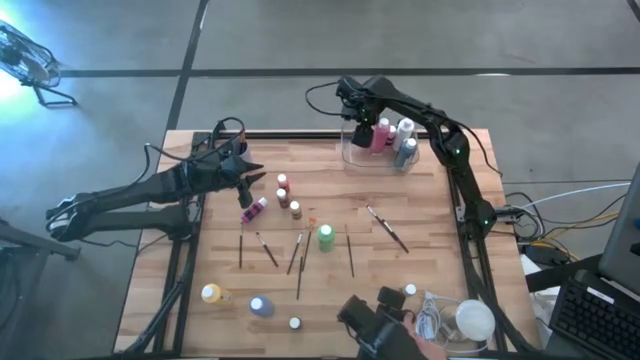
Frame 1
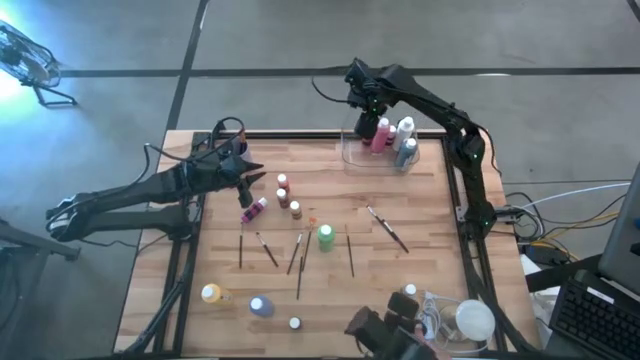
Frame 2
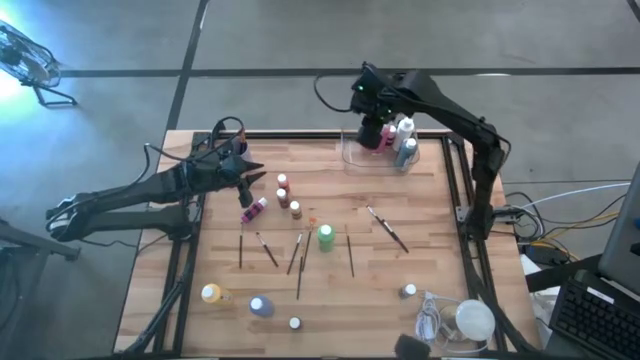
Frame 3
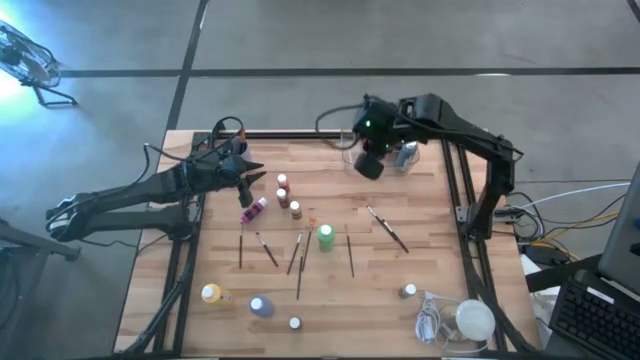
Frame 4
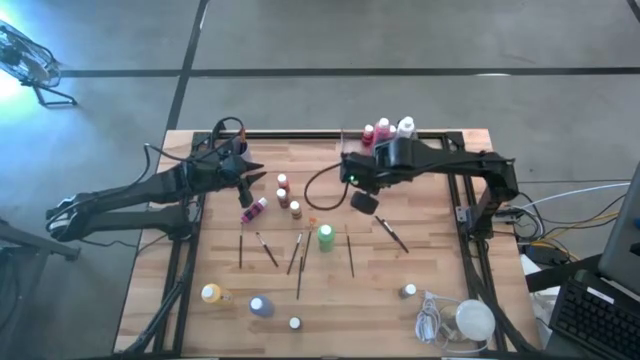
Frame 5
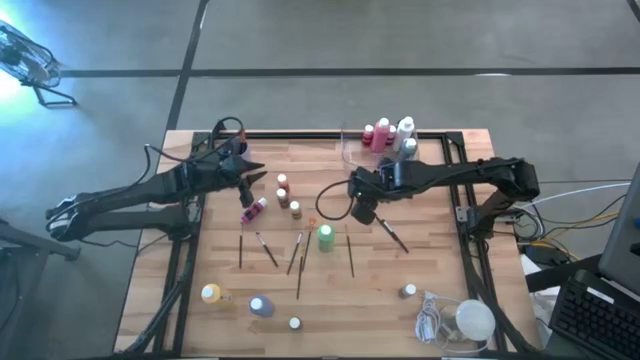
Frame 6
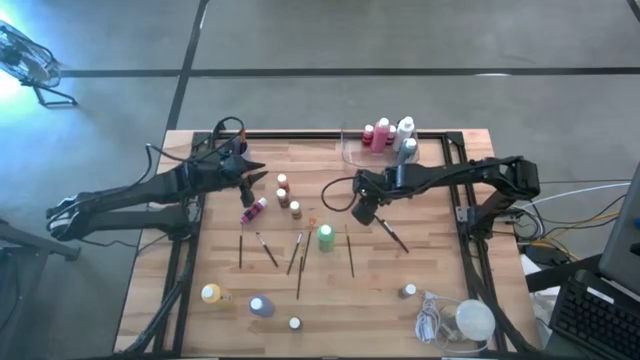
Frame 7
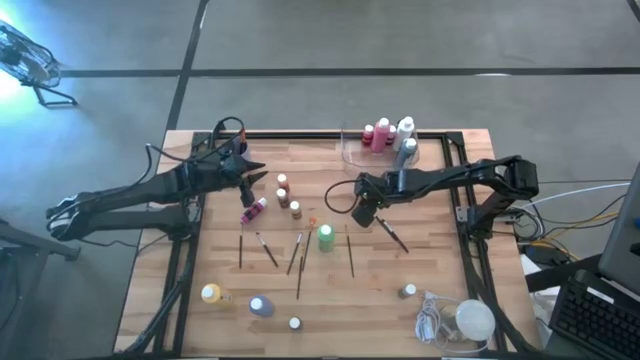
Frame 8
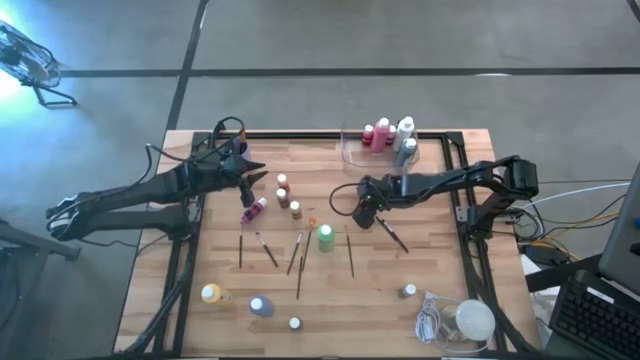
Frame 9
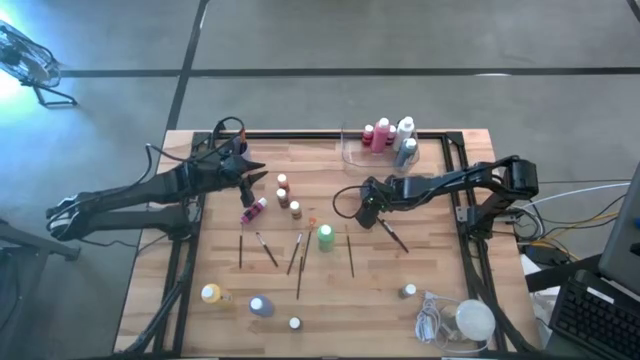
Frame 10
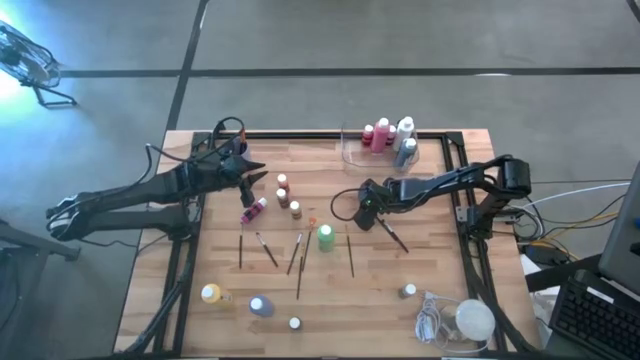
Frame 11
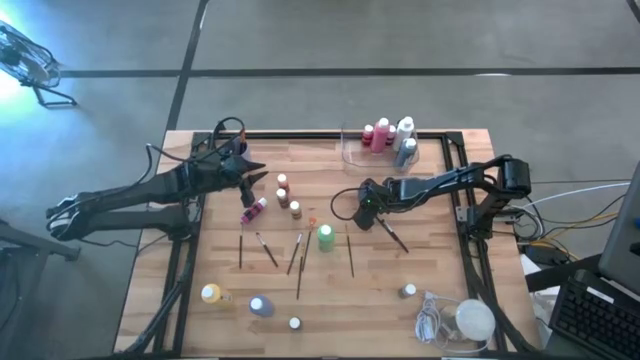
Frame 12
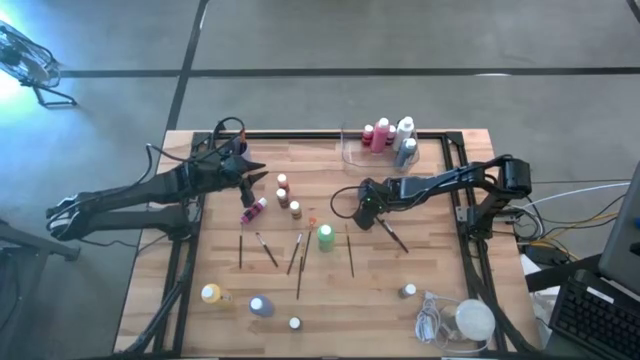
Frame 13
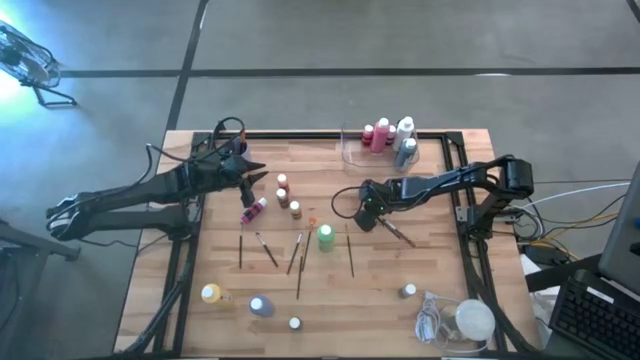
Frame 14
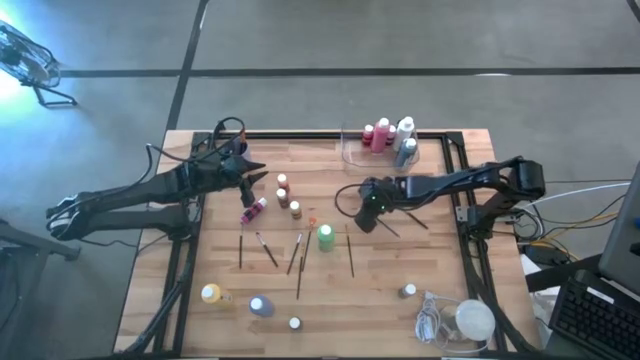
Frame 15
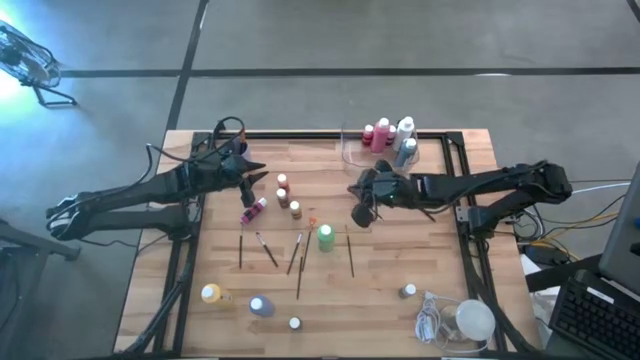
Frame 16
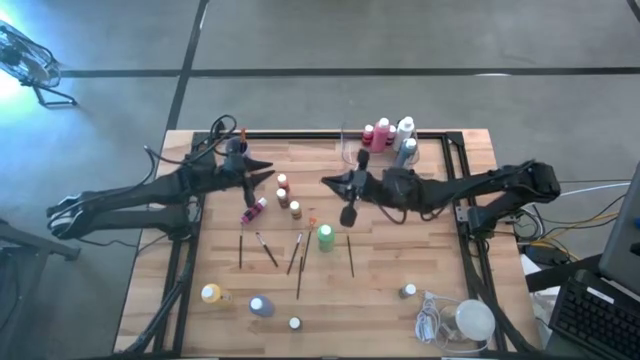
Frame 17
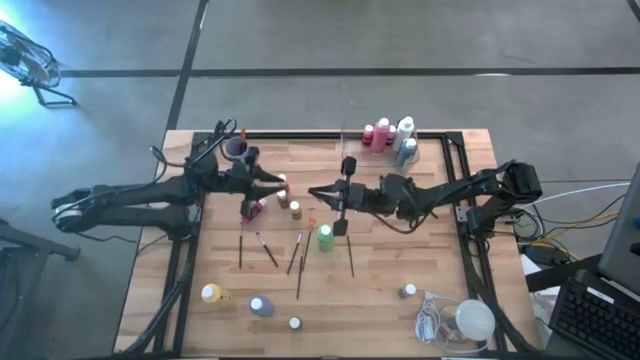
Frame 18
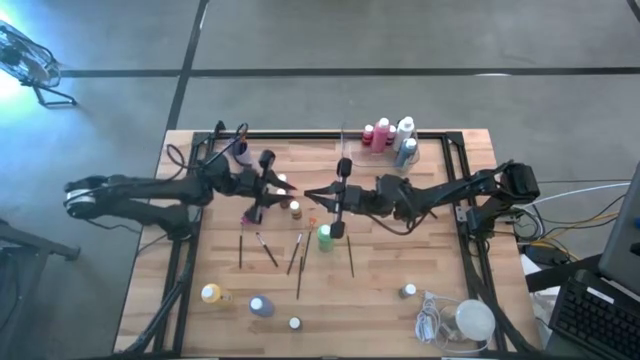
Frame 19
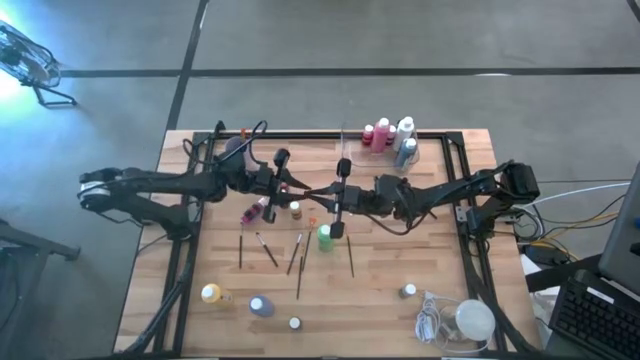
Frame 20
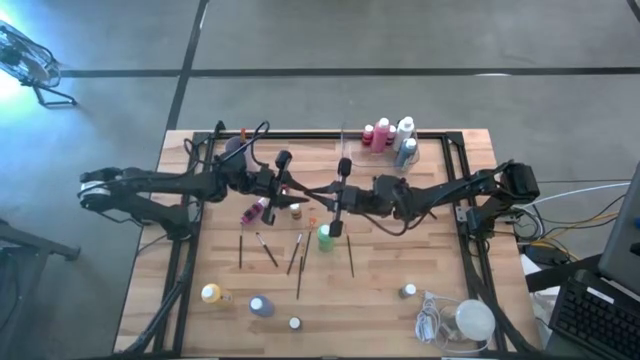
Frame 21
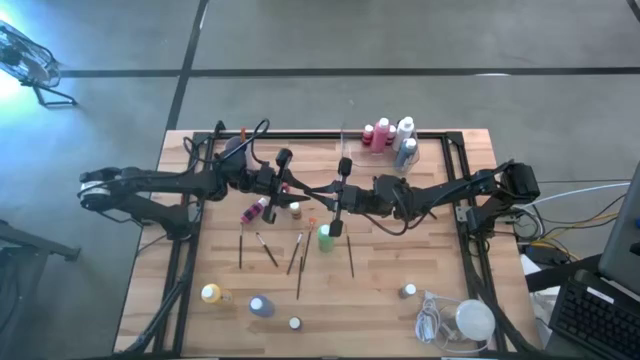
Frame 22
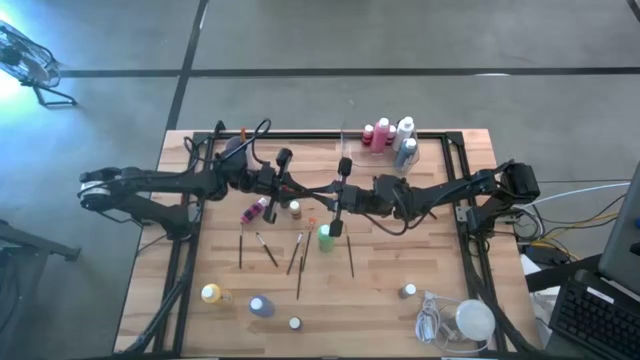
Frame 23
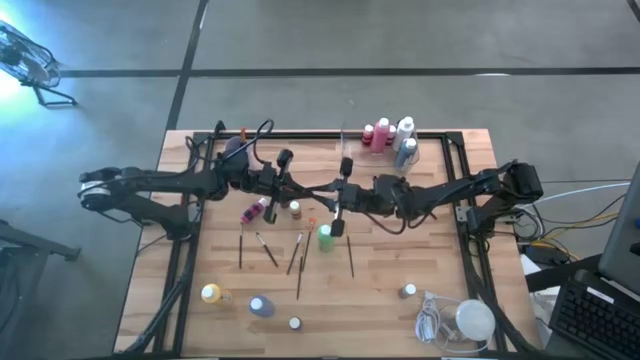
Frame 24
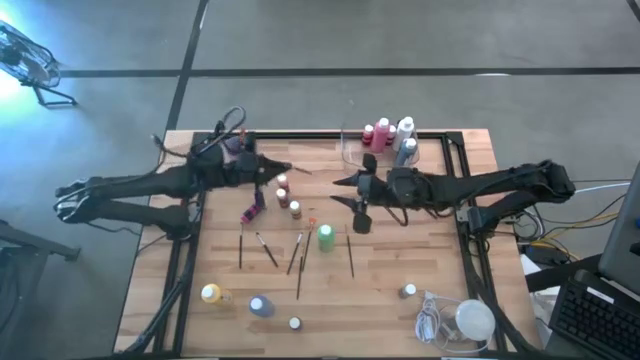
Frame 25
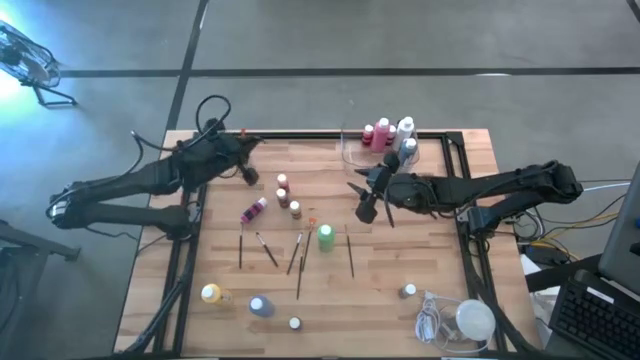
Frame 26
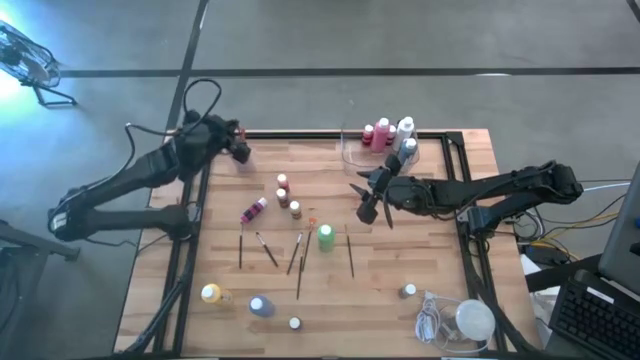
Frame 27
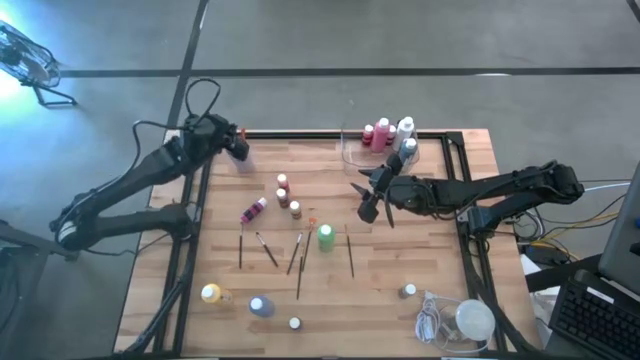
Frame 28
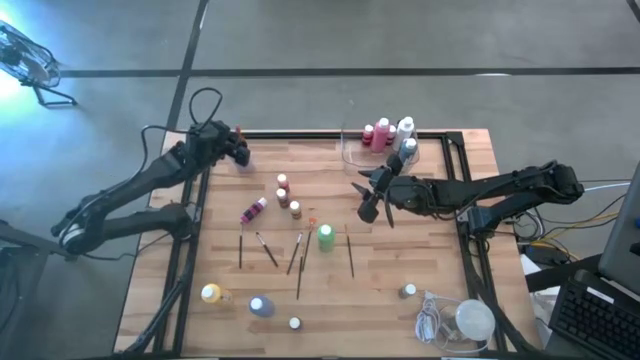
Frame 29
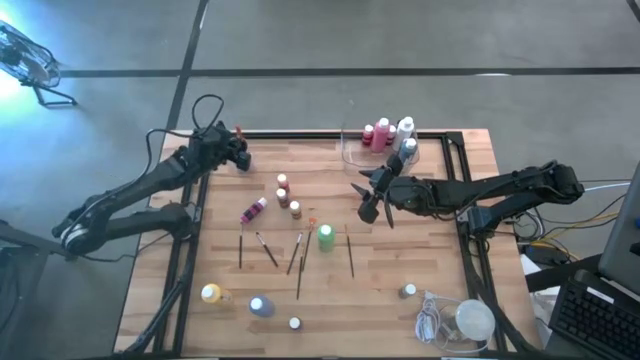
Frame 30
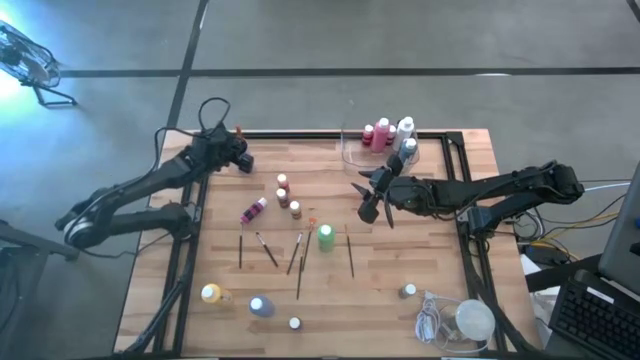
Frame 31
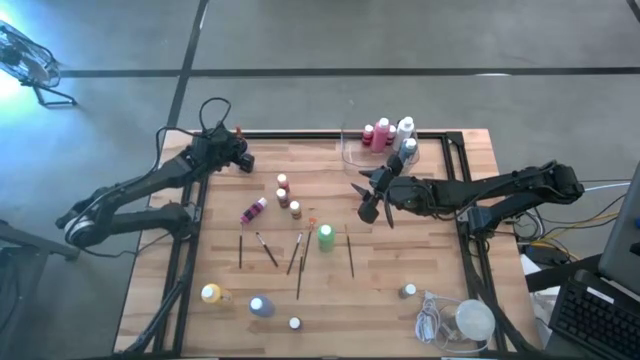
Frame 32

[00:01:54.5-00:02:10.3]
Task: Pick & Place Paint Supplies
Put the silver paint brush into the violet cup

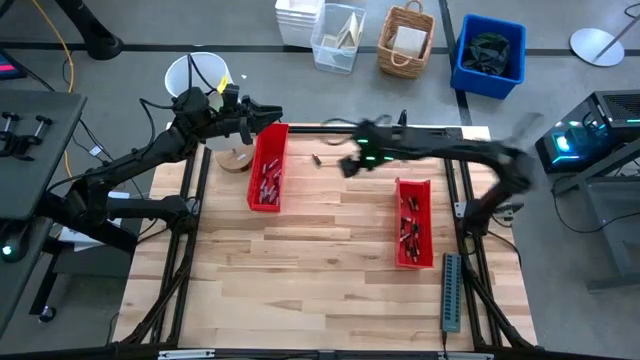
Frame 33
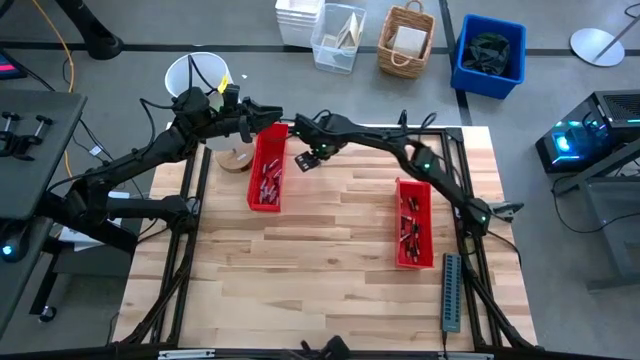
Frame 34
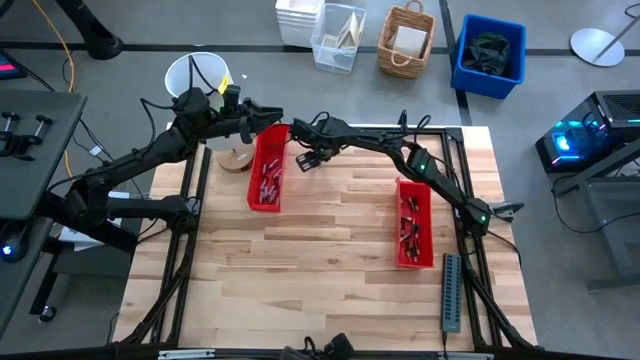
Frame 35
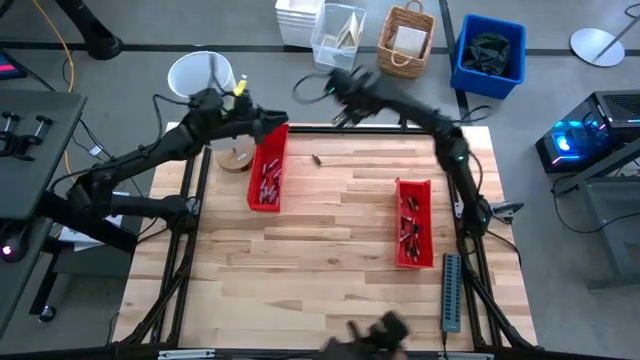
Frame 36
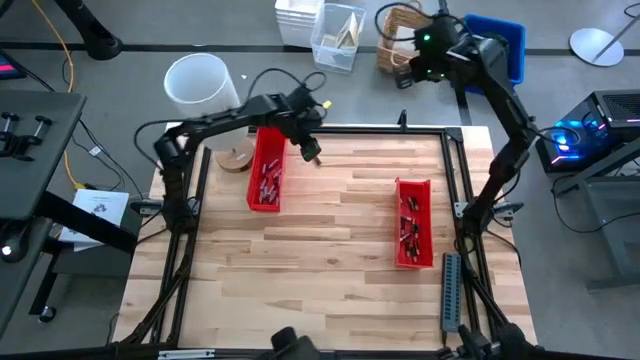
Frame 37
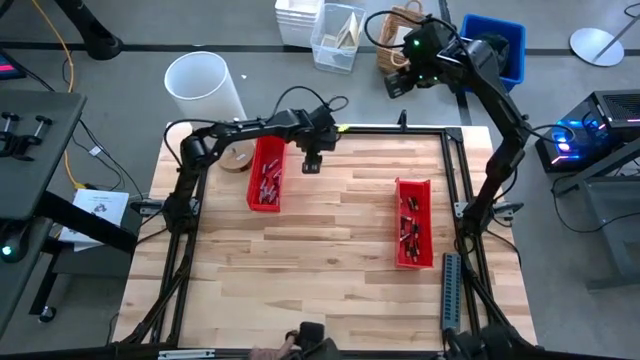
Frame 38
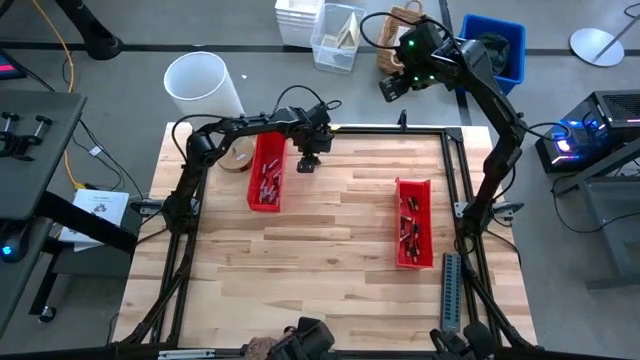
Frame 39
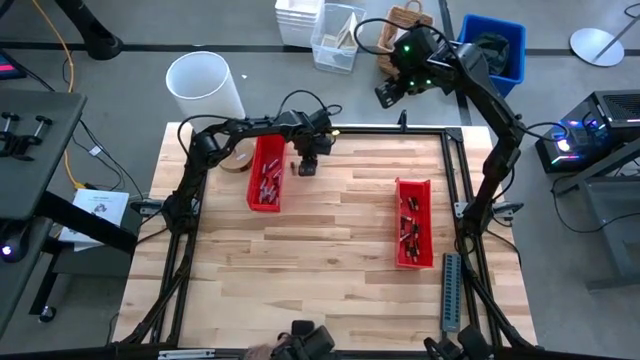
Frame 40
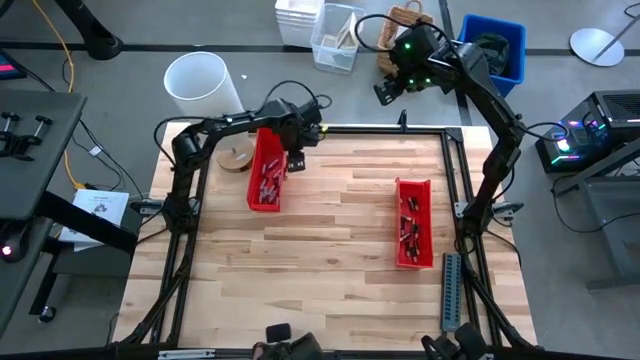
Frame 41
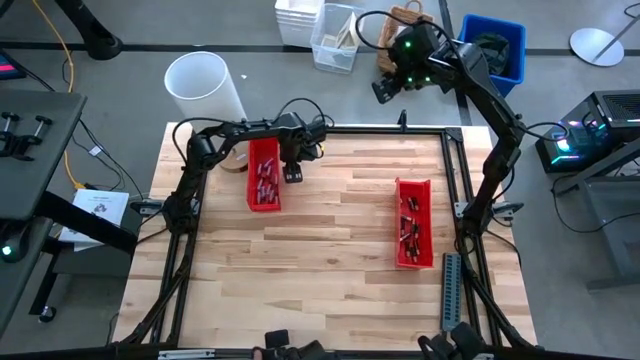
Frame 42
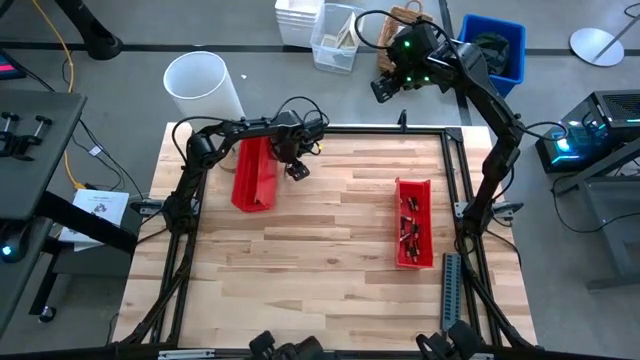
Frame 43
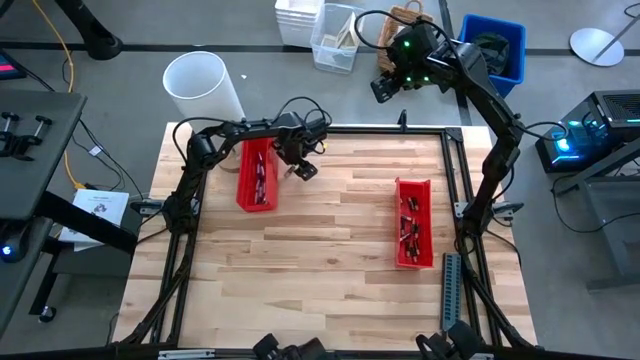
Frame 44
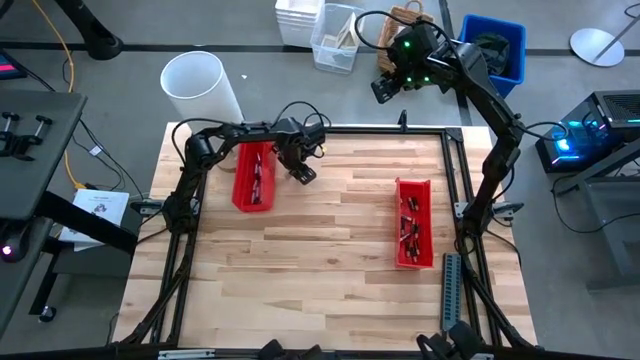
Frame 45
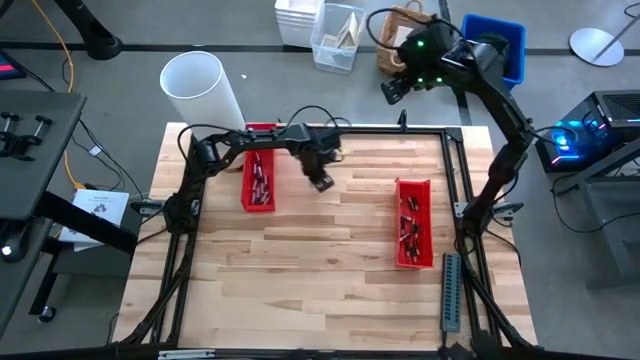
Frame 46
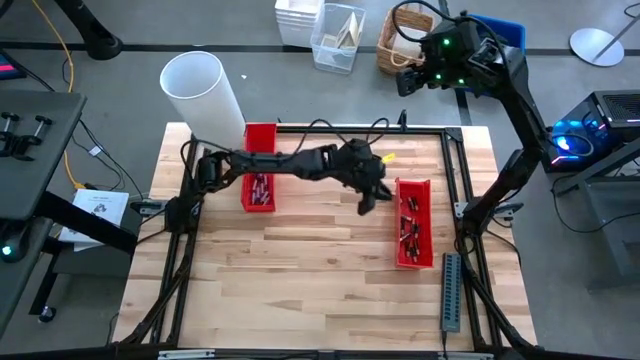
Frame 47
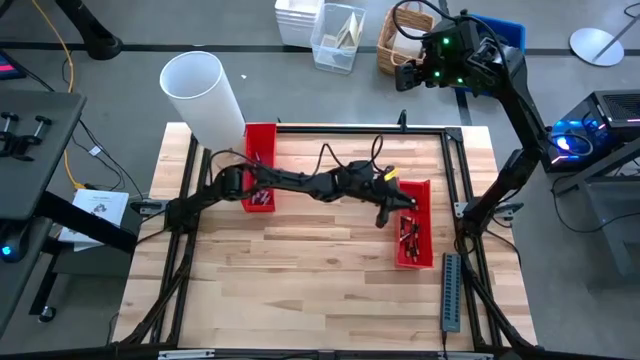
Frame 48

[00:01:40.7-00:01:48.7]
Task: Sort batteries
Put the black battery into the bottom red bin
